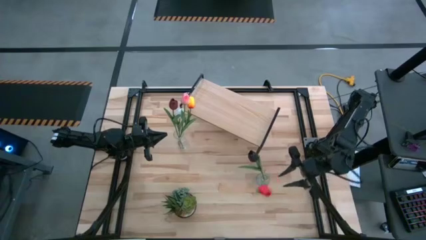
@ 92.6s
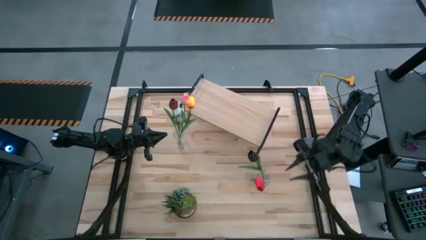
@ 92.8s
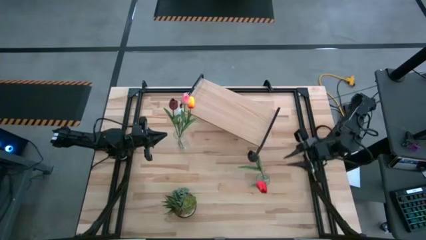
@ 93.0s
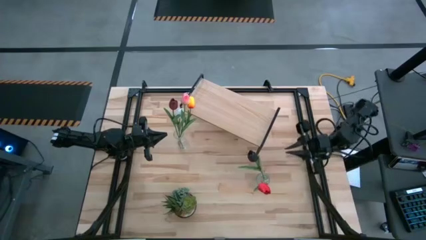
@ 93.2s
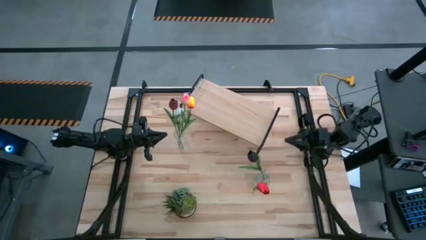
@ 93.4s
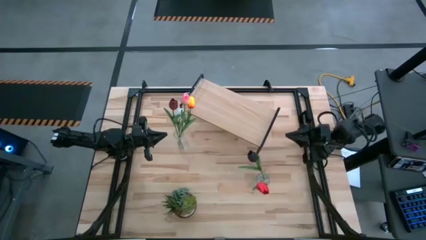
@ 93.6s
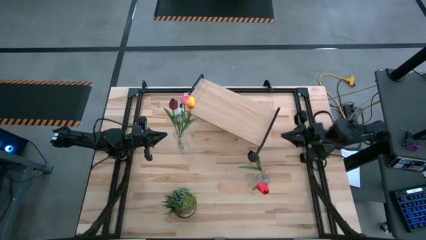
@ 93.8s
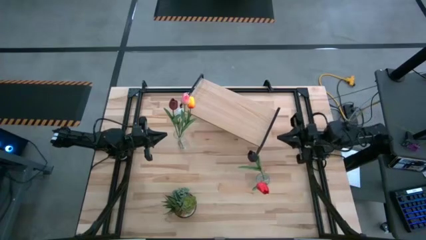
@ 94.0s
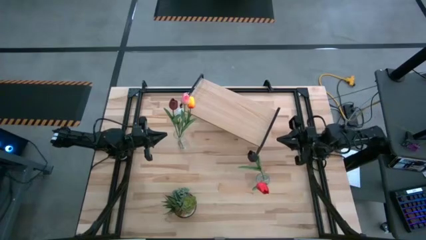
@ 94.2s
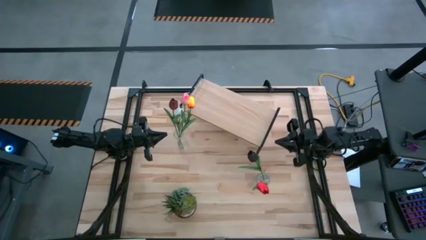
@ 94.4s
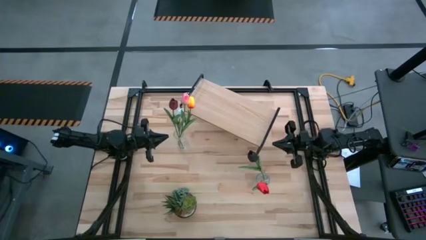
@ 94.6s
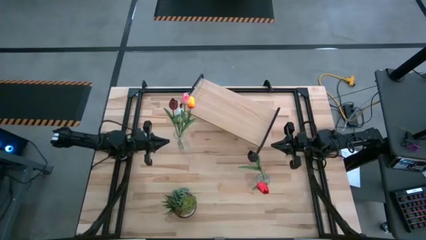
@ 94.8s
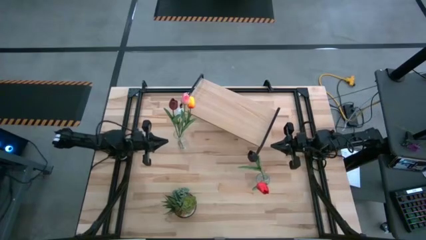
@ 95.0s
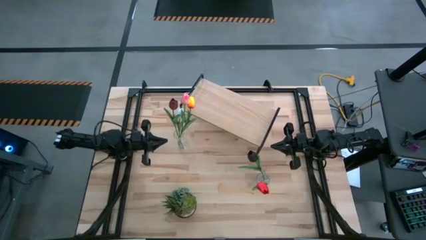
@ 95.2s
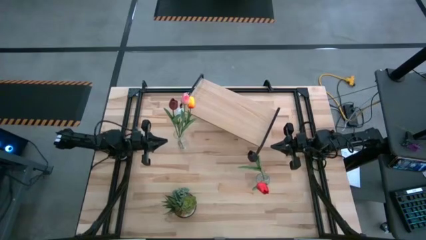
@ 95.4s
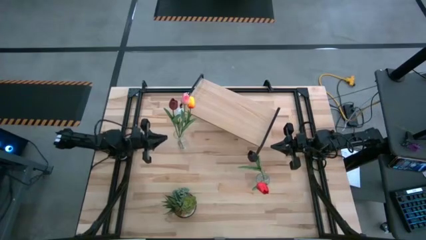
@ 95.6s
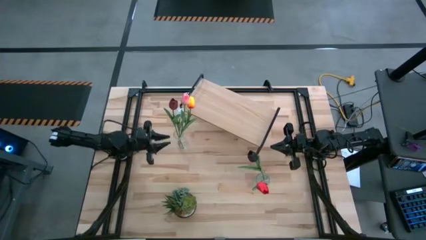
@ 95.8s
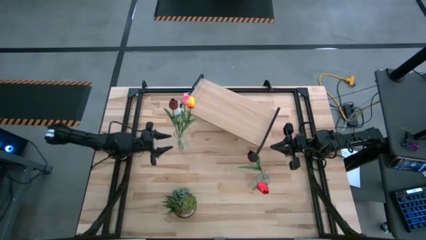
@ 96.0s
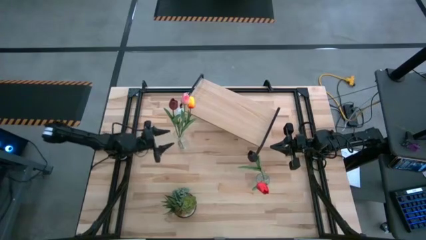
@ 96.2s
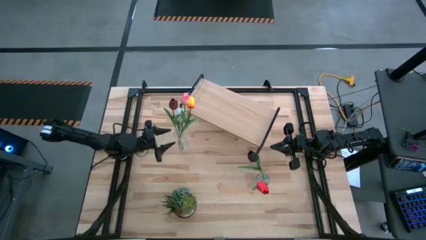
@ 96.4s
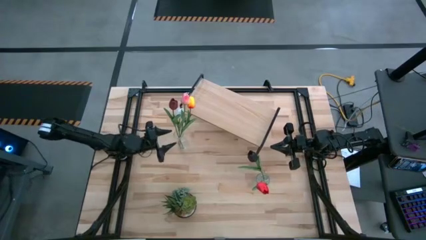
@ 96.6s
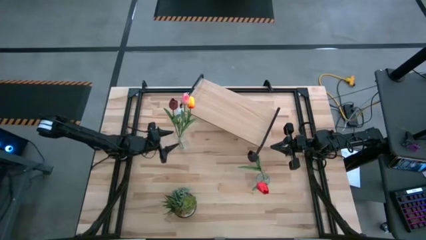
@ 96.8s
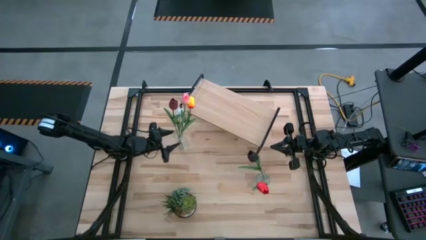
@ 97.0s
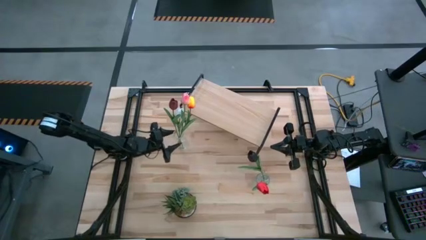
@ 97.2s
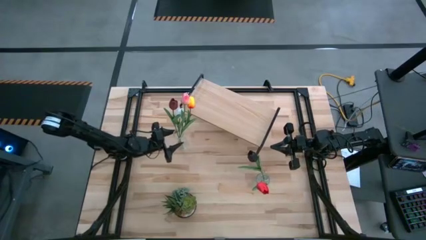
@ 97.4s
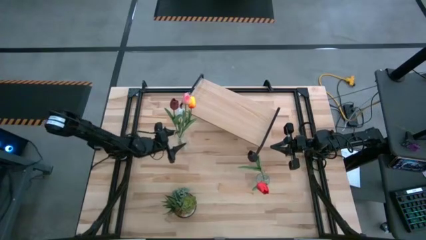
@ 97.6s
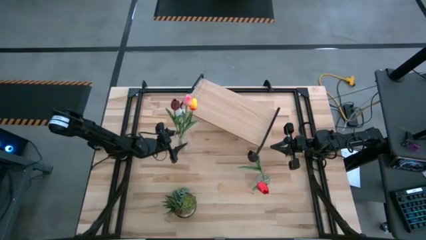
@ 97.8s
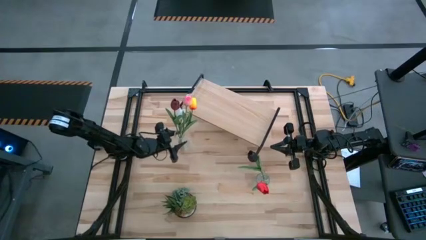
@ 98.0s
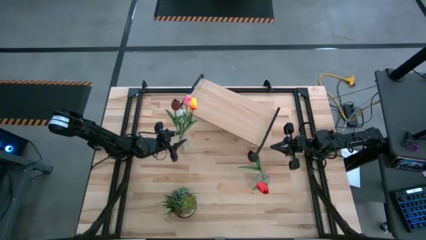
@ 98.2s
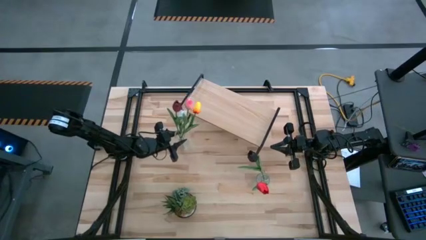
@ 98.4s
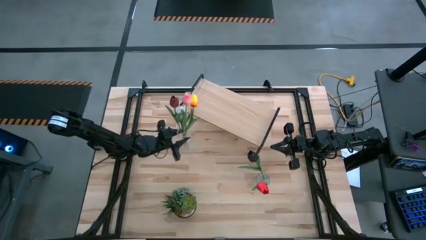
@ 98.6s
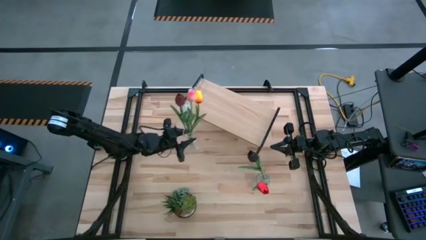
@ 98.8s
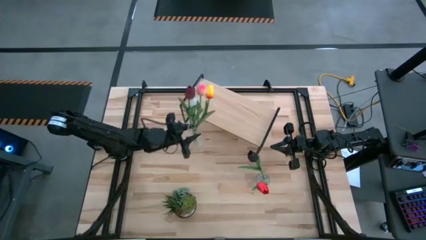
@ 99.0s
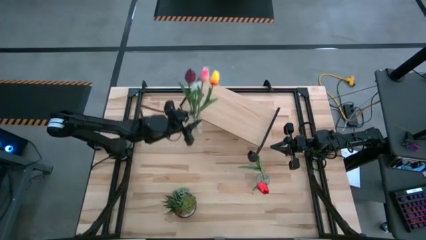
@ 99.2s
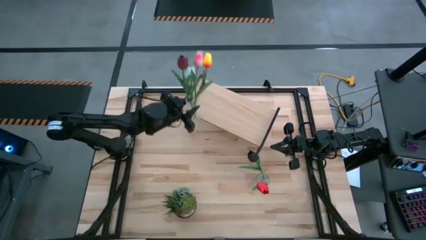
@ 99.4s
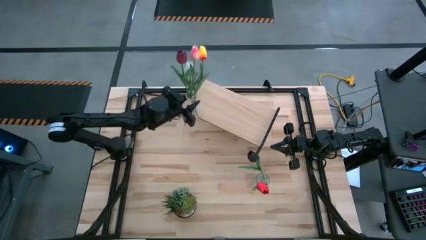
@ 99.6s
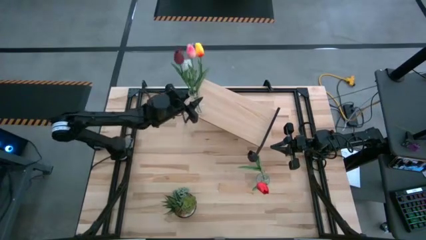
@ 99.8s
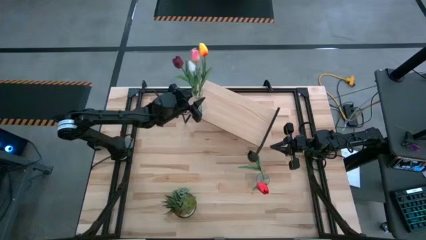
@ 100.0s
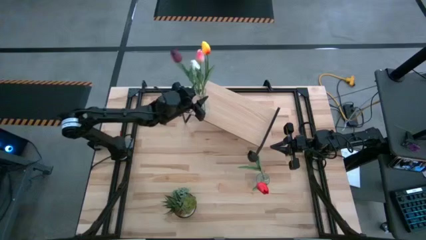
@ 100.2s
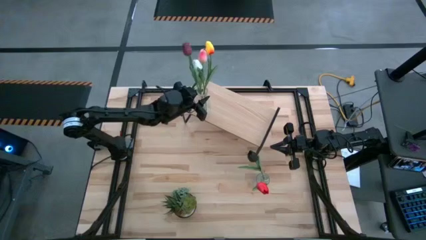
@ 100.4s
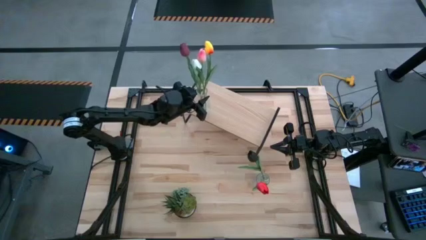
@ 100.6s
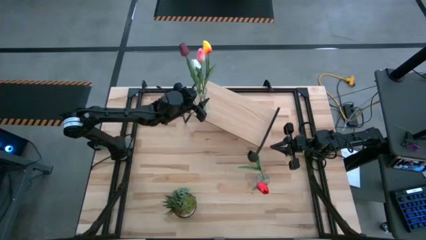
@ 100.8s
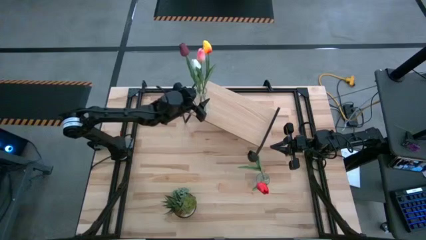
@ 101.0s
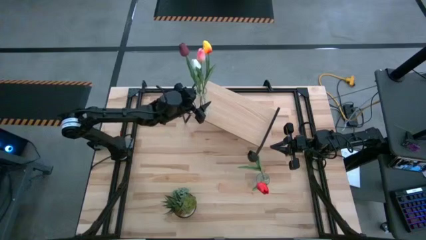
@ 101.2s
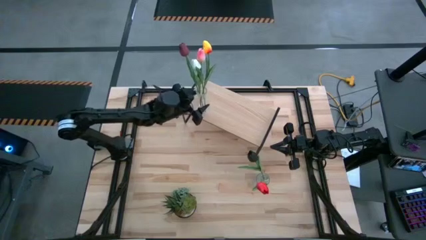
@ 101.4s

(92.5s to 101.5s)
Task: Pick and place flowers into a vace then onto a shelf
Put the left transparent vase with the tulips on the shelf

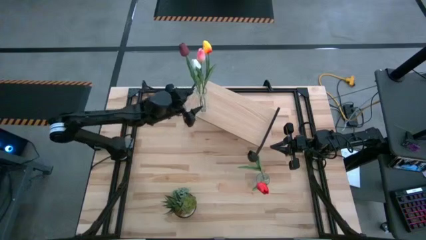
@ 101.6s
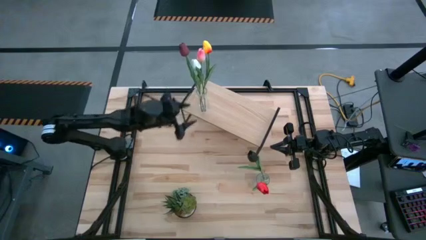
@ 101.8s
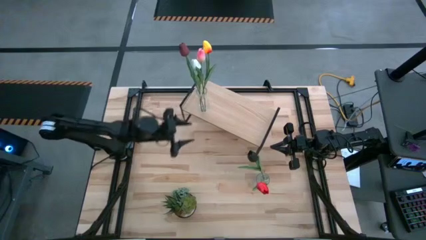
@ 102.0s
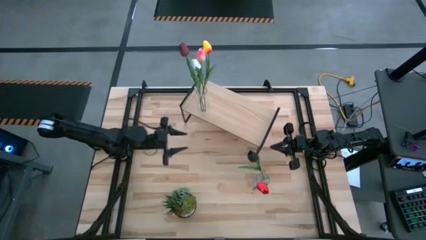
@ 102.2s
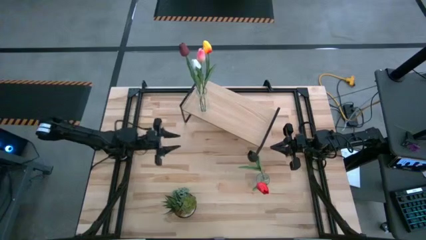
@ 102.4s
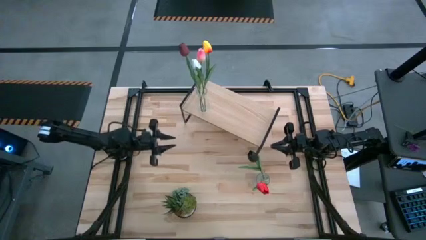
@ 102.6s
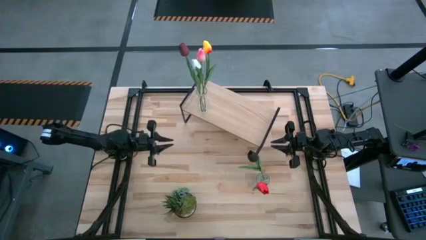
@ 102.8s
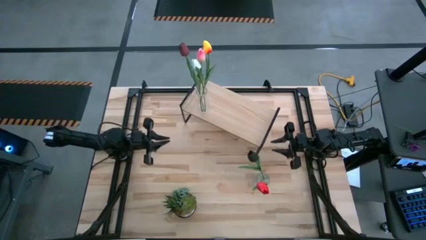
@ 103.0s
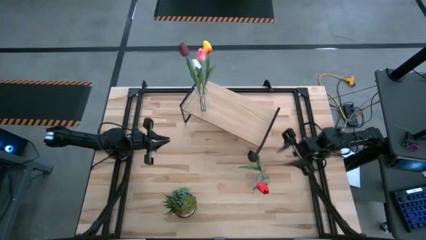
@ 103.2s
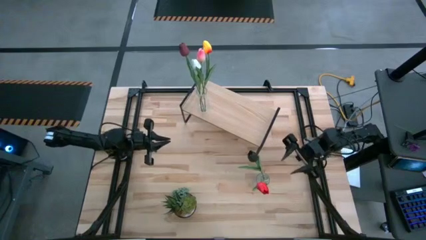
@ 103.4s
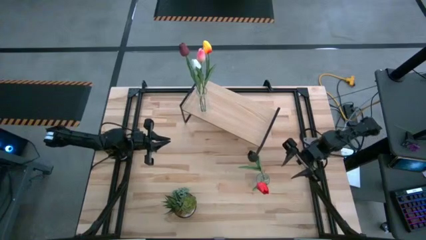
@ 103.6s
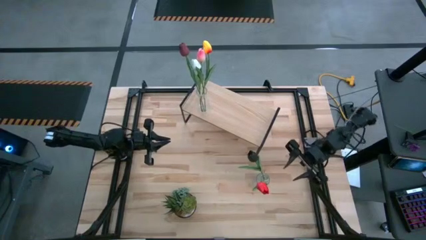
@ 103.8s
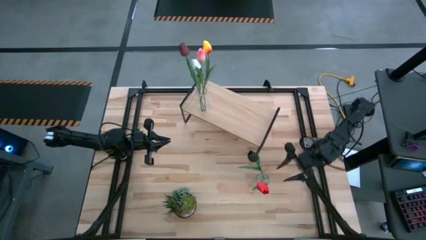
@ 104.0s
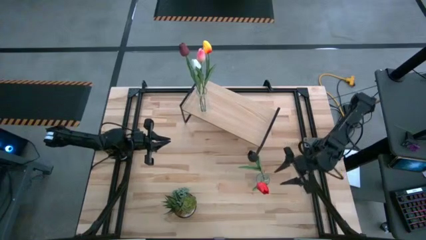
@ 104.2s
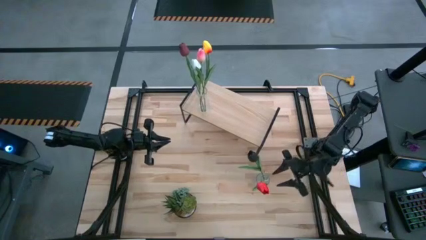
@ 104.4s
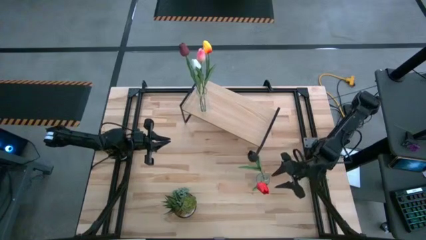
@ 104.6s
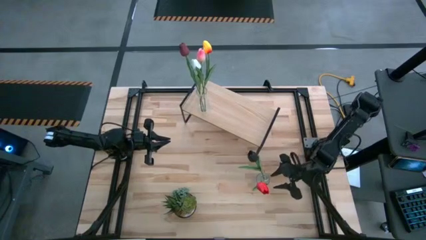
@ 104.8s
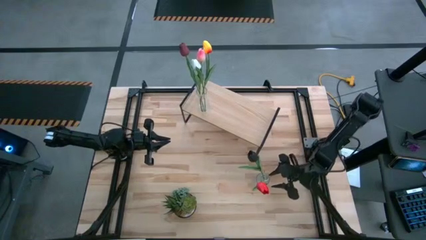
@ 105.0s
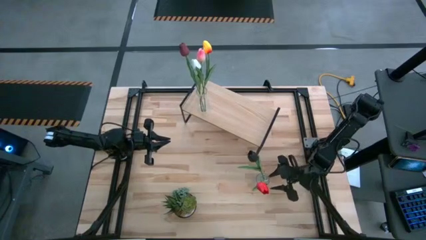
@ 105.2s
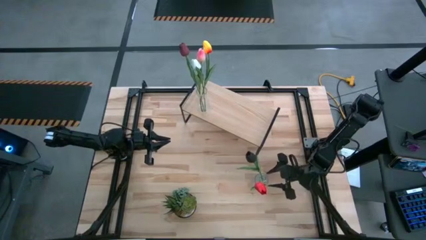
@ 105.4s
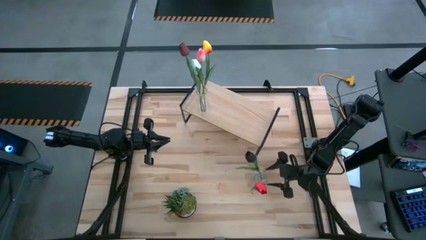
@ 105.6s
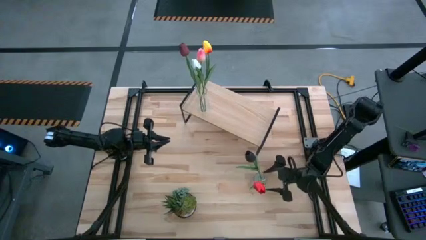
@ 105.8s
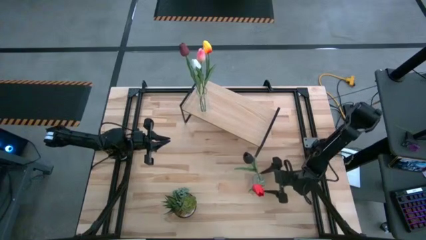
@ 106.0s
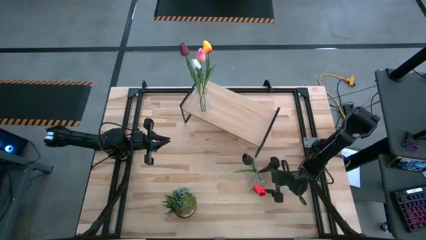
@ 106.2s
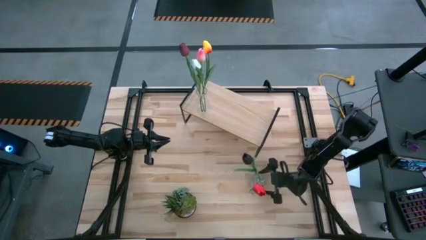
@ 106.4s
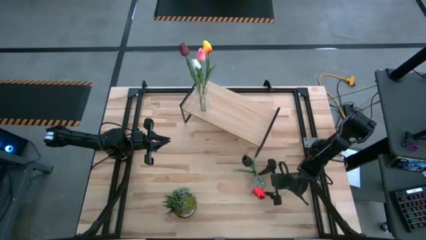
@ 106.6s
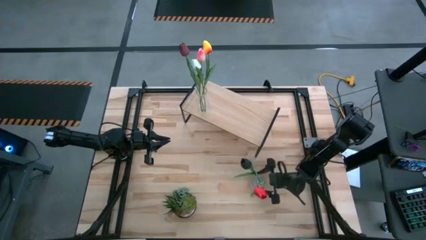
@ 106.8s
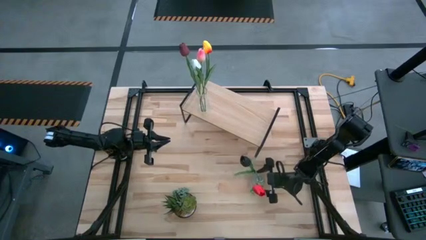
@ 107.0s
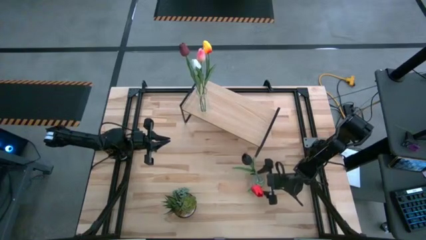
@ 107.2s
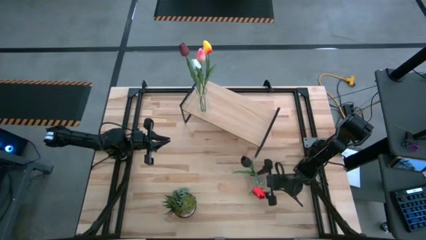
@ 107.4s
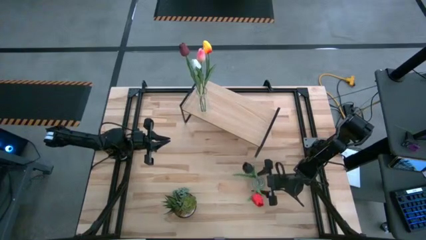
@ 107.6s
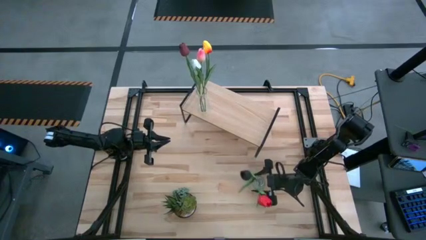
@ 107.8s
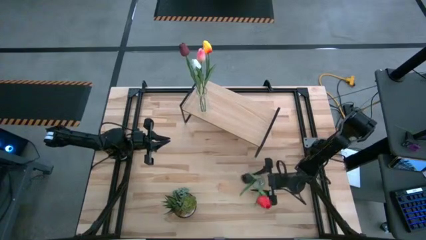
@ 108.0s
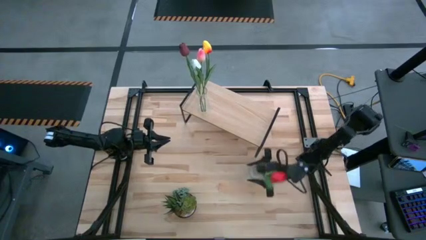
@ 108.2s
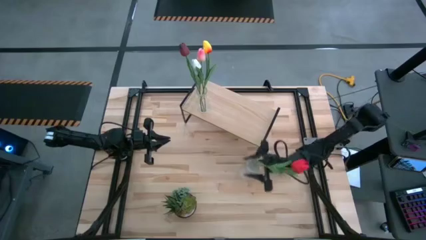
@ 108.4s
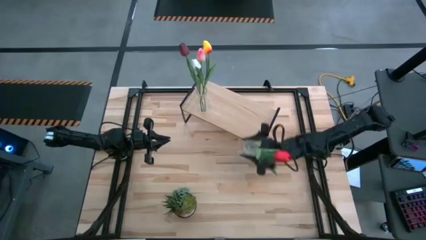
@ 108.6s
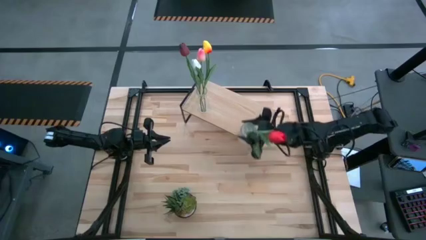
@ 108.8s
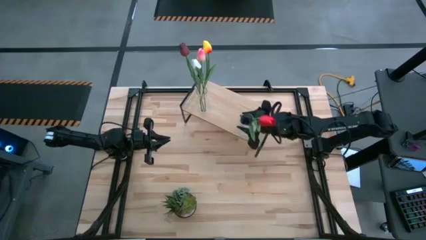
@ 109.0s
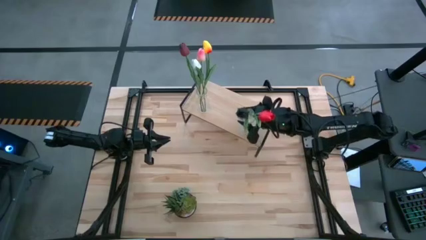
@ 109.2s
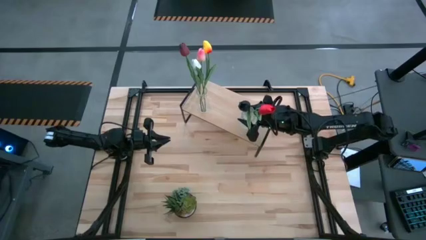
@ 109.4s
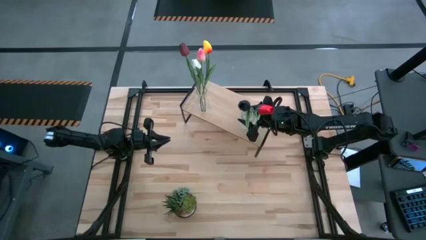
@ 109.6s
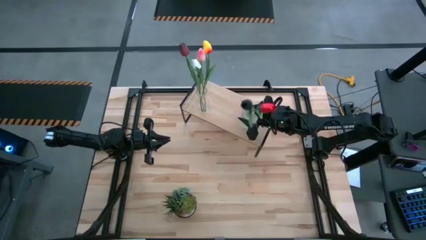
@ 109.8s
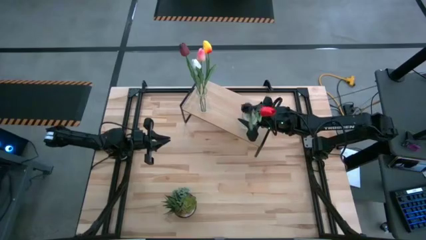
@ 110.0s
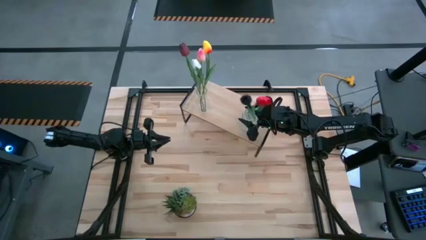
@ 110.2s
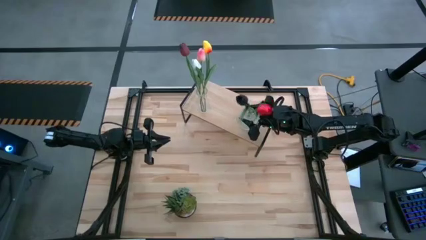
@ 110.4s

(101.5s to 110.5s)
Put the transparent vase with the tulips on the shelf
